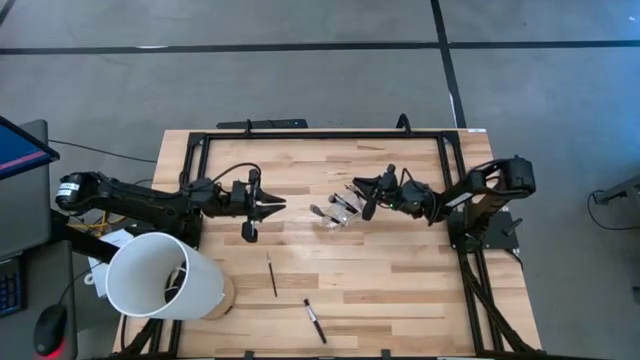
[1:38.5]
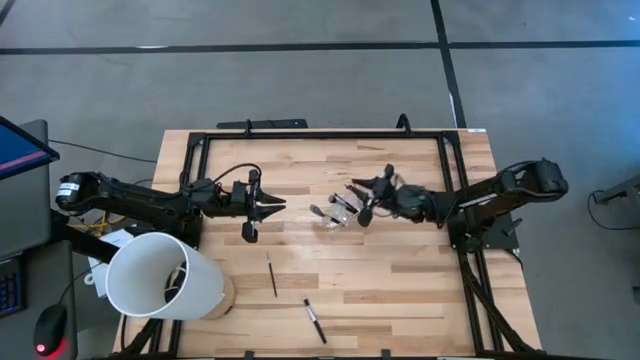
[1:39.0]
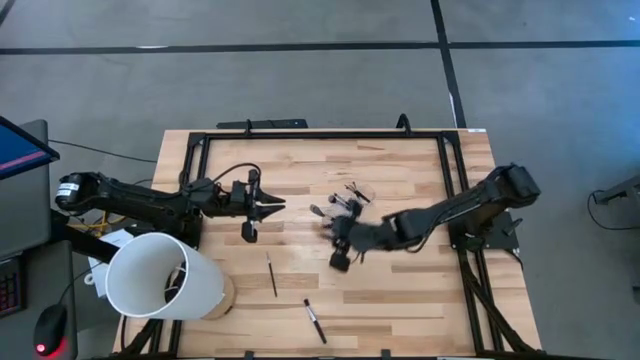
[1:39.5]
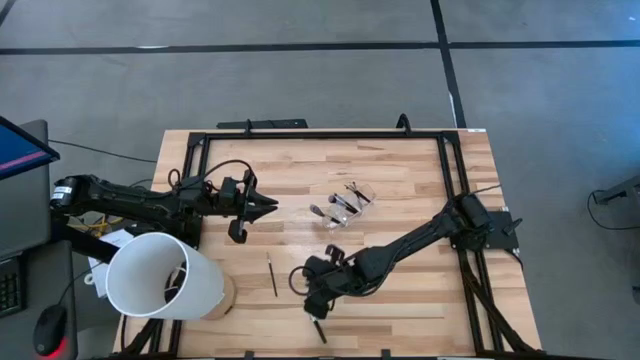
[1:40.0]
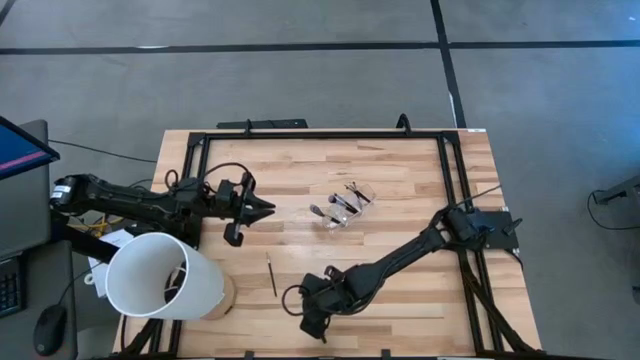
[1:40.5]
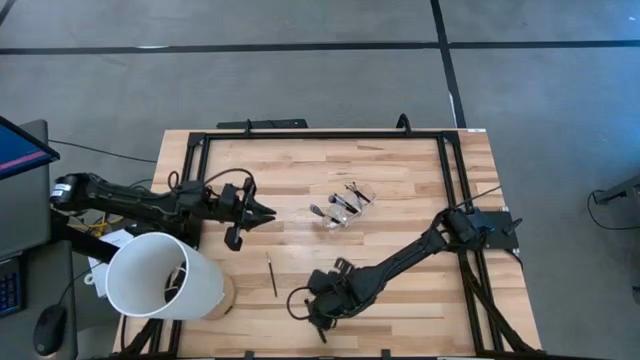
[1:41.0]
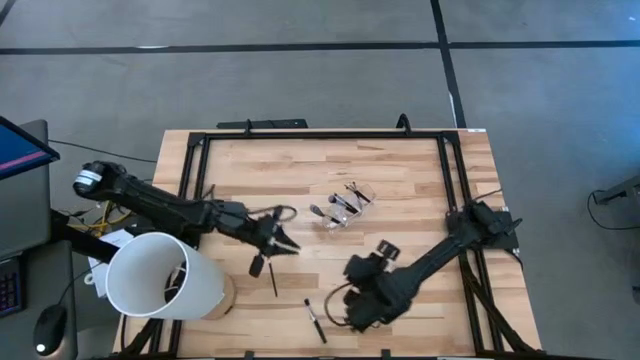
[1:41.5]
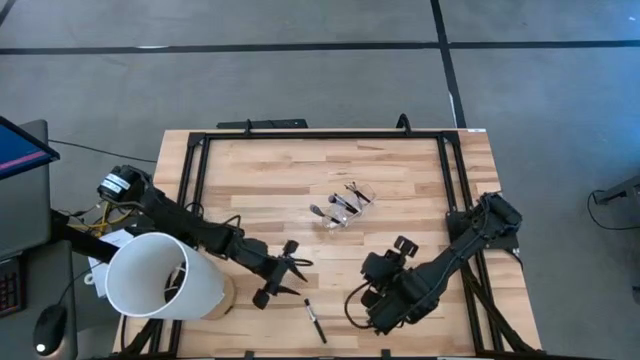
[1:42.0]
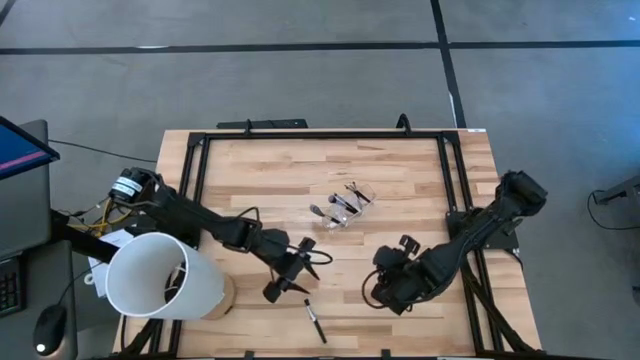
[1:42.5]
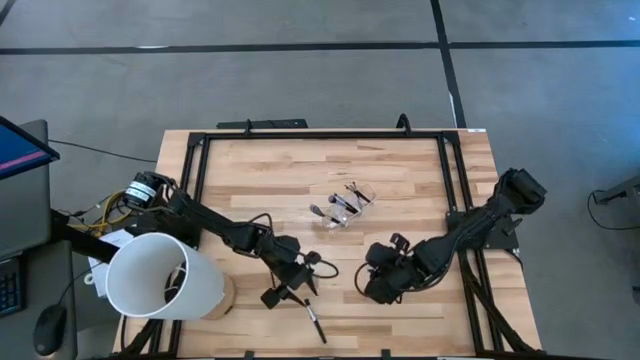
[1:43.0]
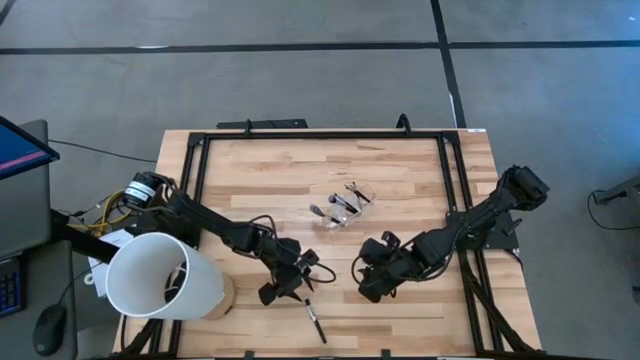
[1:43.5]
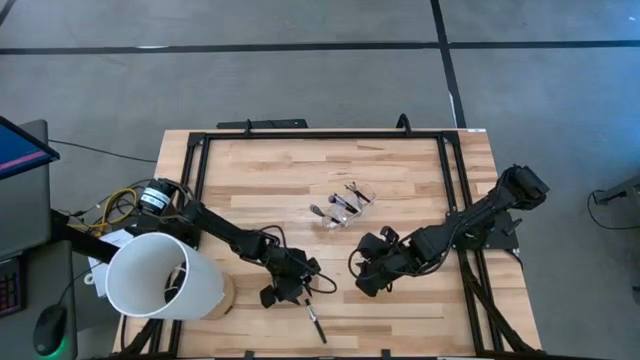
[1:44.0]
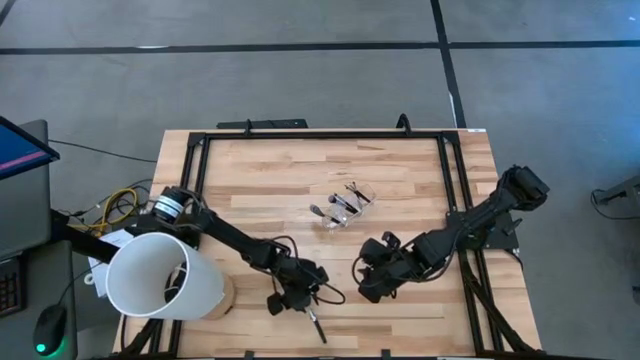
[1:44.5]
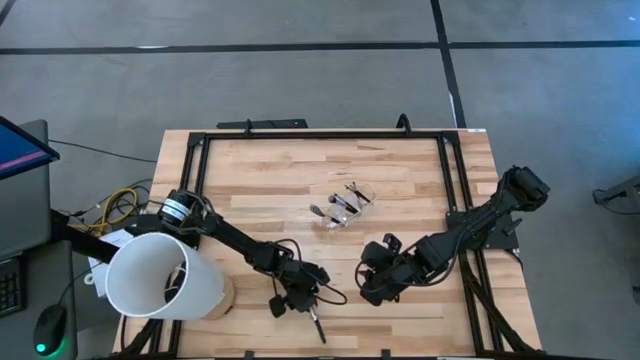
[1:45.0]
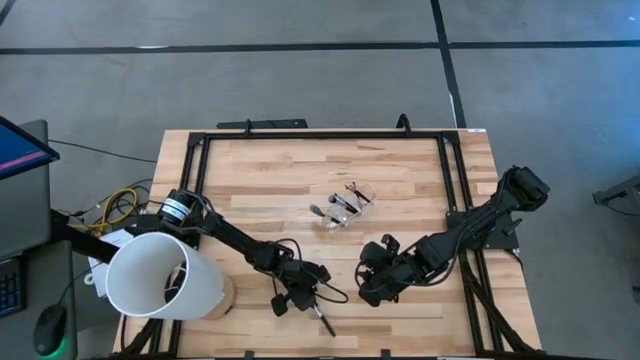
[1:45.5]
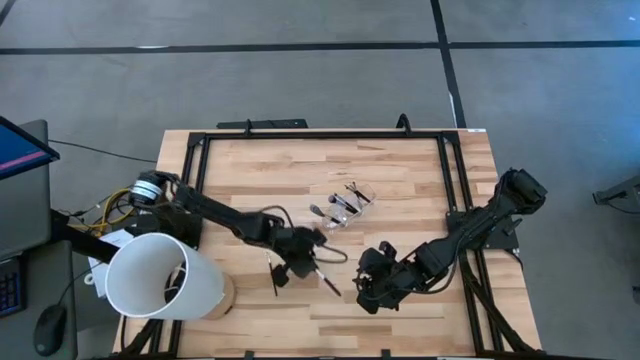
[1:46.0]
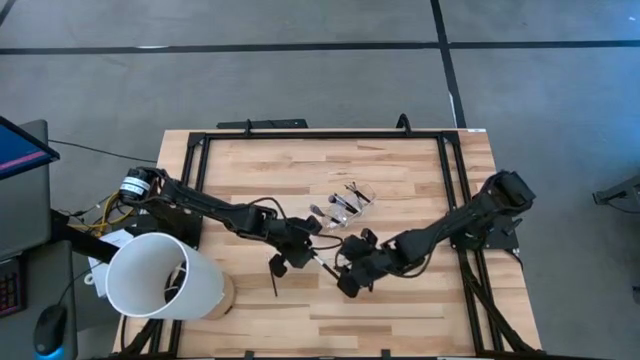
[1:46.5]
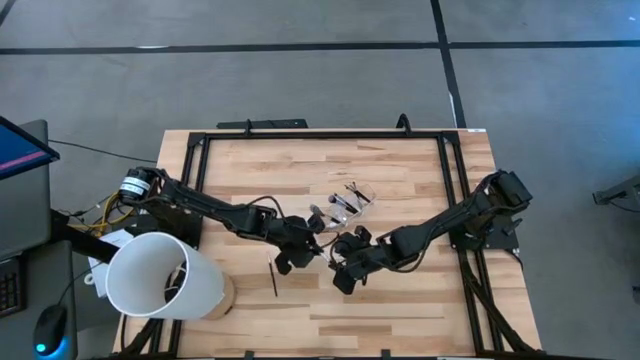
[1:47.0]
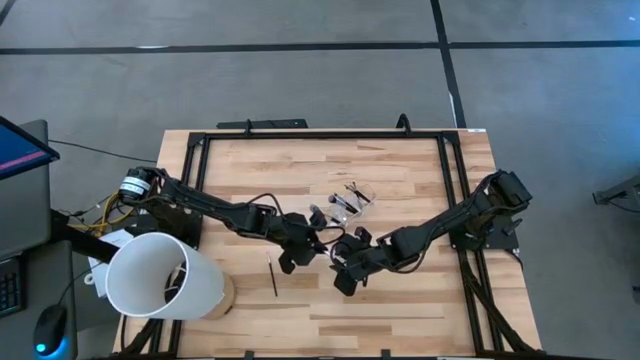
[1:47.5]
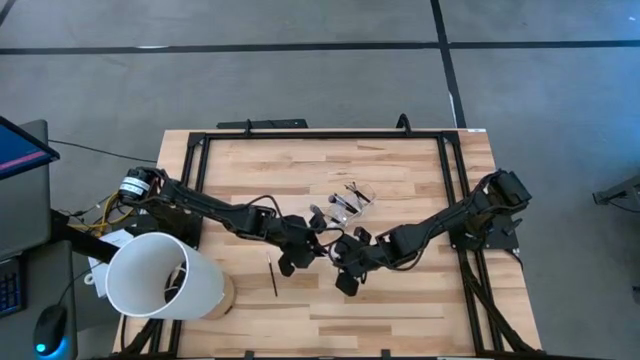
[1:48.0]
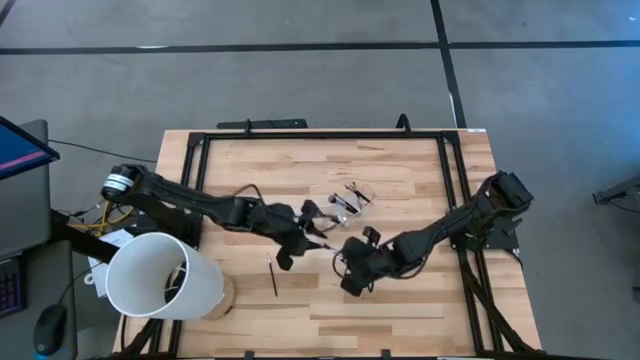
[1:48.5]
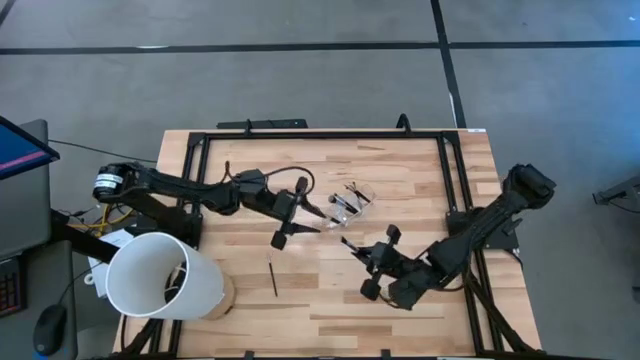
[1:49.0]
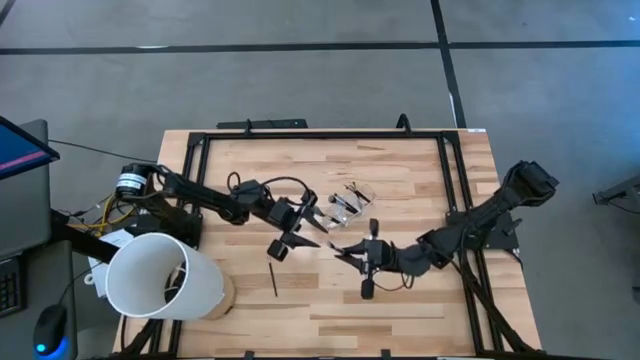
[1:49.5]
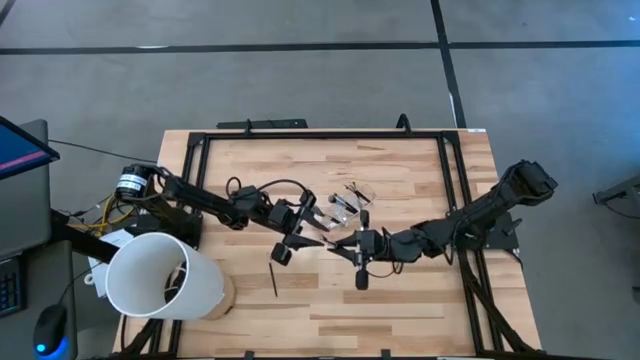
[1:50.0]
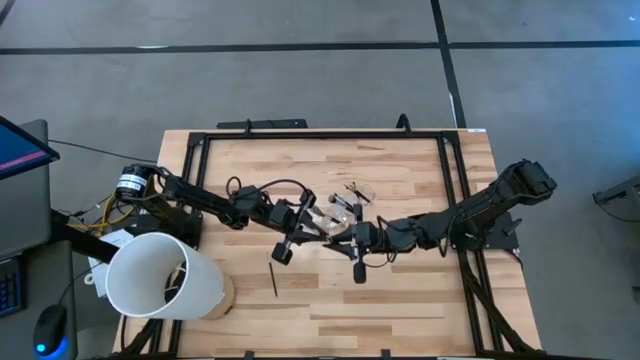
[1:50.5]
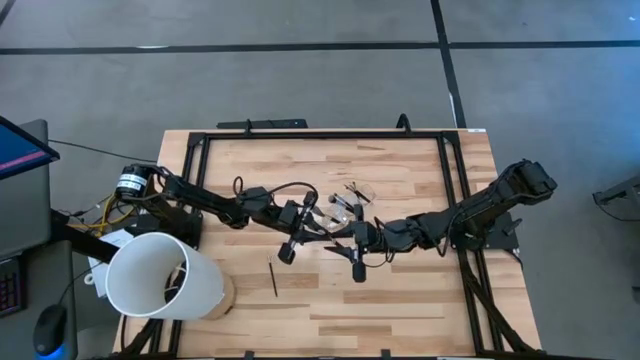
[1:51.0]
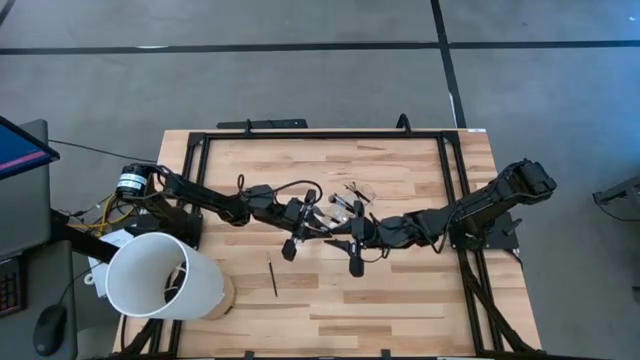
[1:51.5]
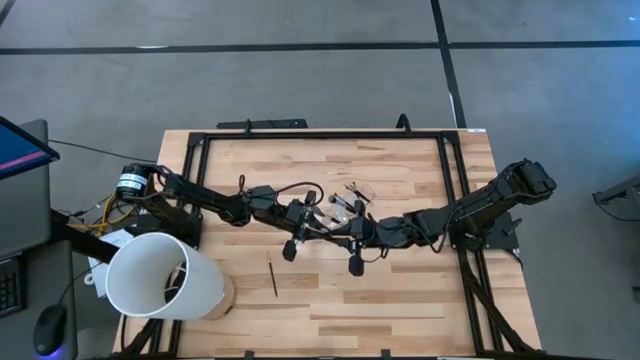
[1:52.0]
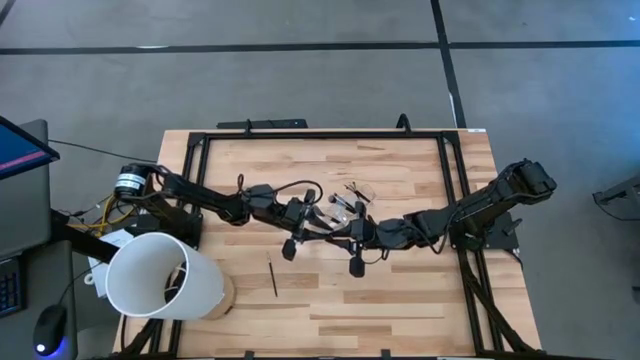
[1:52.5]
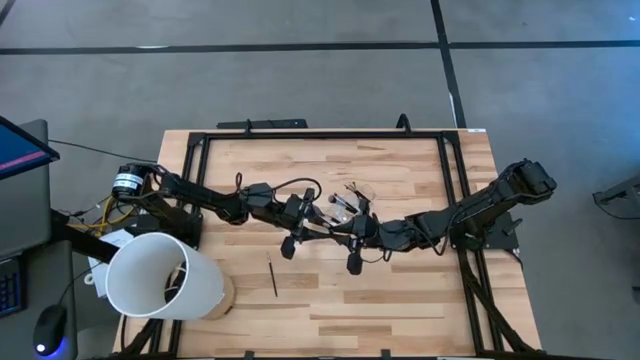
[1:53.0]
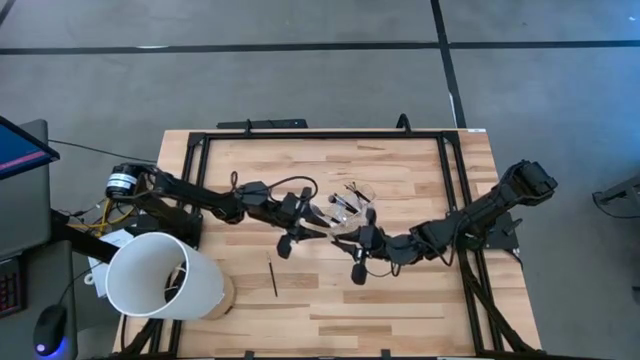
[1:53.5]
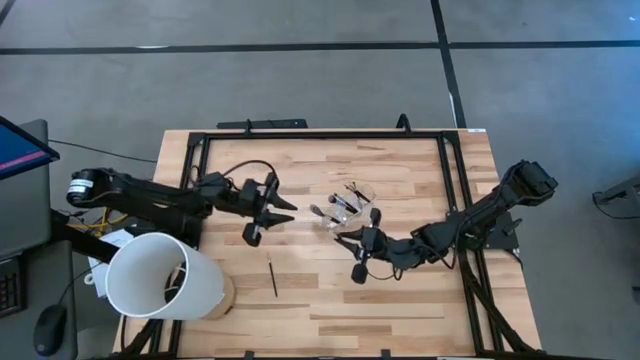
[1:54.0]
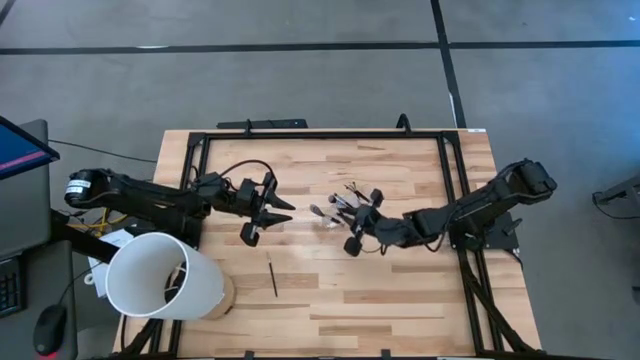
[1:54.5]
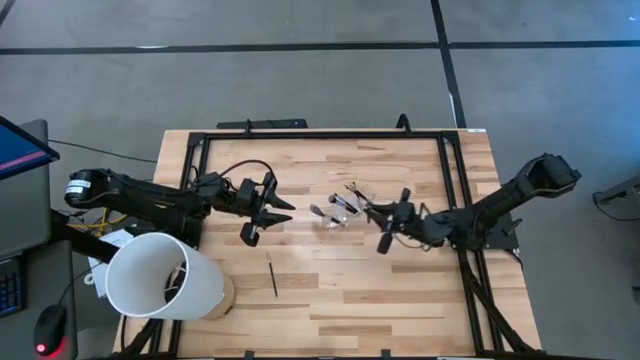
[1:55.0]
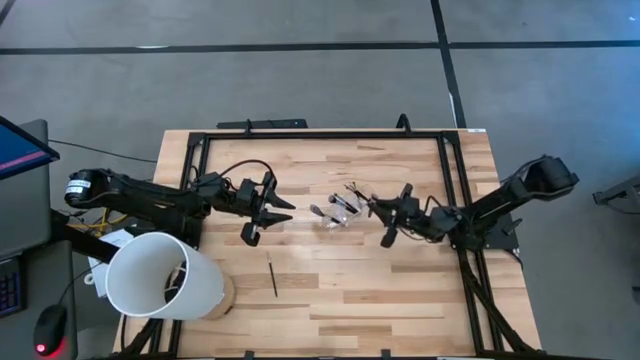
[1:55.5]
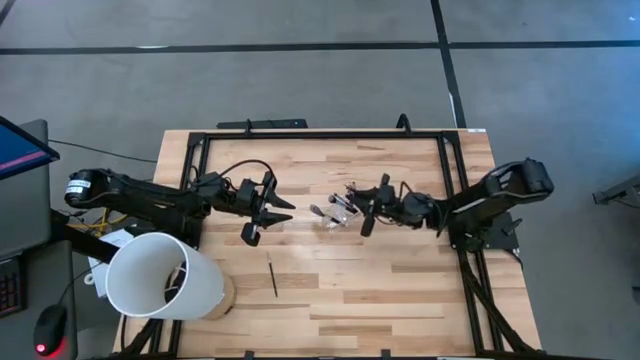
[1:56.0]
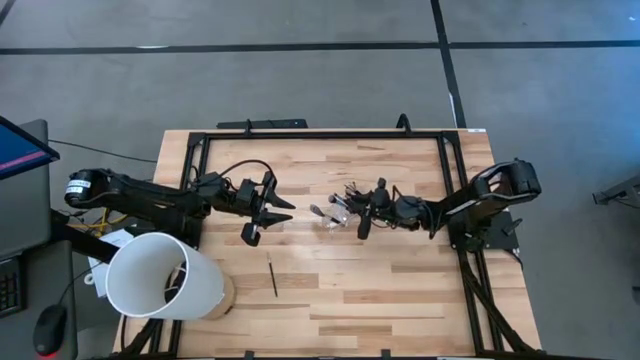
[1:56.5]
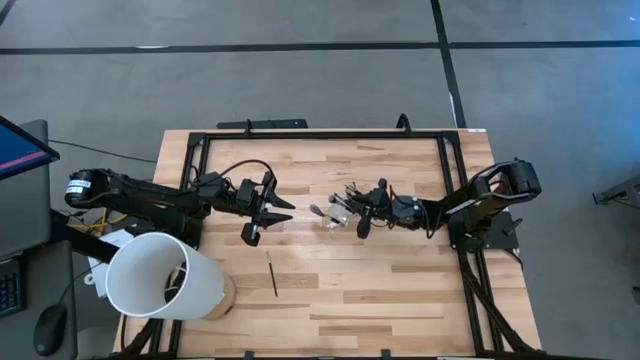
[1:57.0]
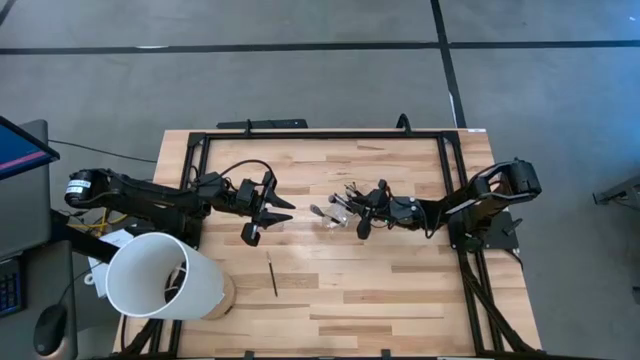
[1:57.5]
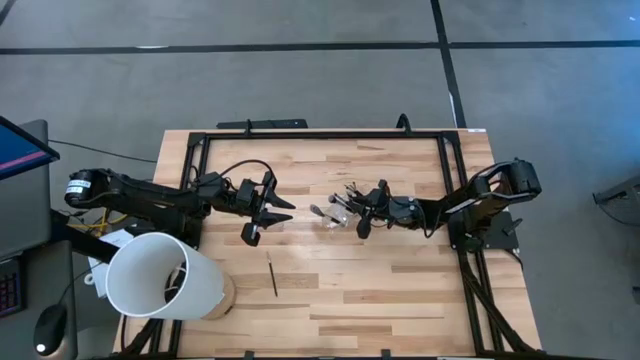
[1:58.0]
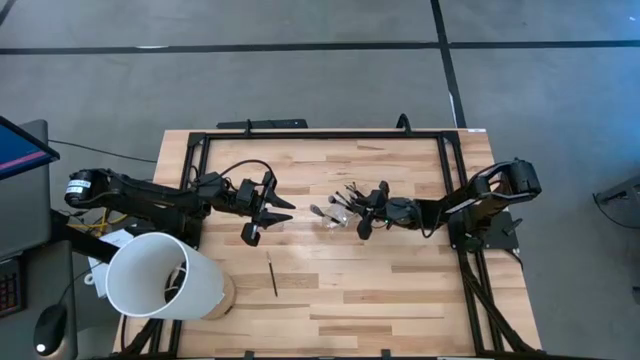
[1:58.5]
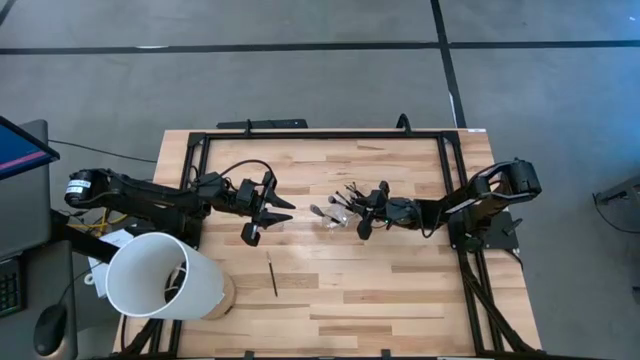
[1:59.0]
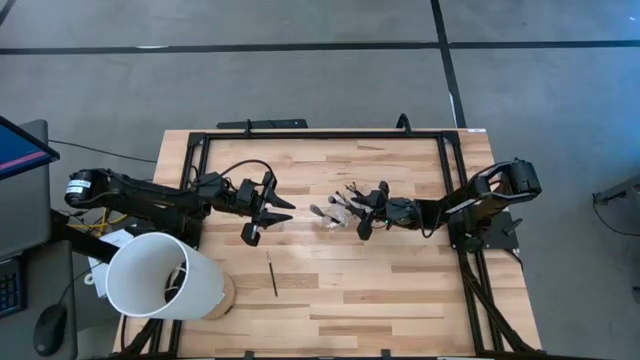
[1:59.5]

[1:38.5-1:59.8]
Task: Put items in baskets/containers
Put the black blush brush into the transparent organizer

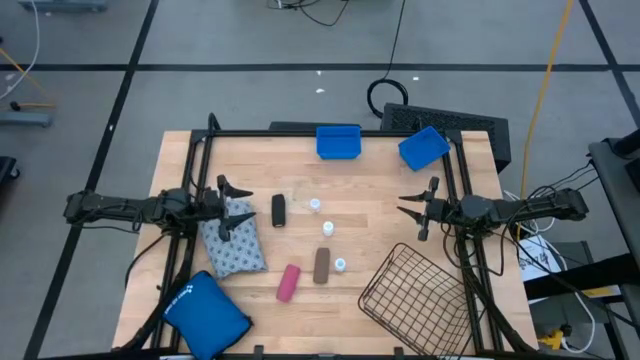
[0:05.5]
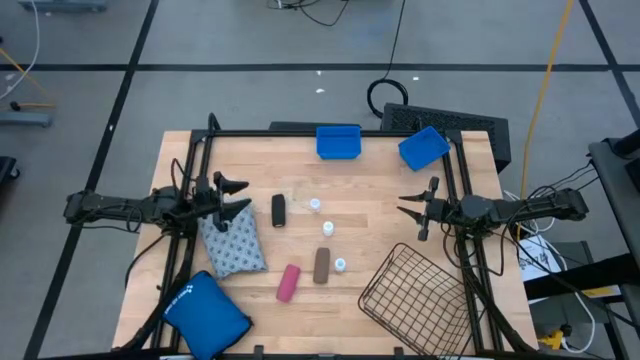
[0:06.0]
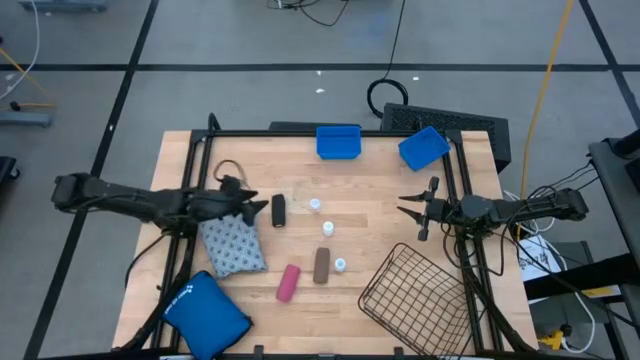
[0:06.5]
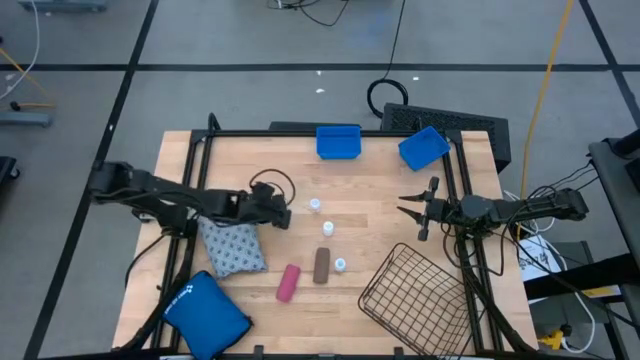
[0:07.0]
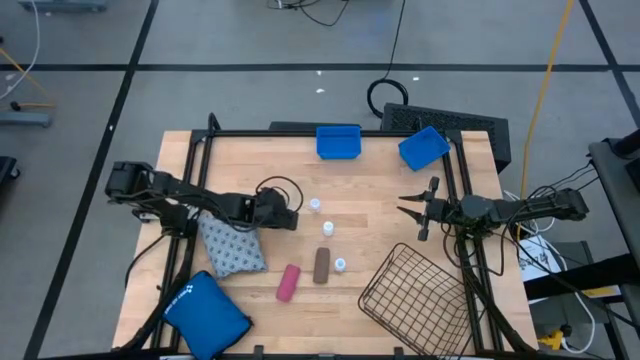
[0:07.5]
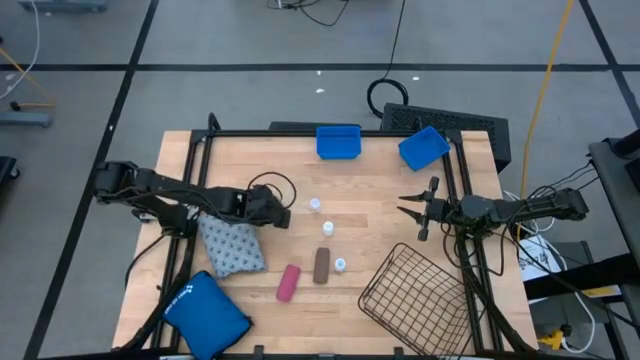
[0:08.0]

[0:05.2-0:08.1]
Task: Pick & Place Medicine items
Put the black rolled gauze into the left blue bin
